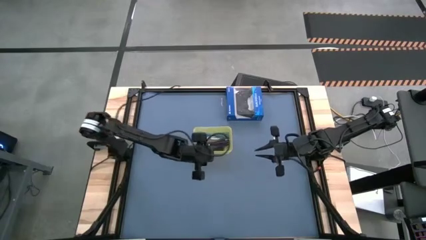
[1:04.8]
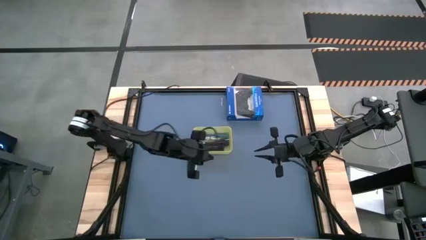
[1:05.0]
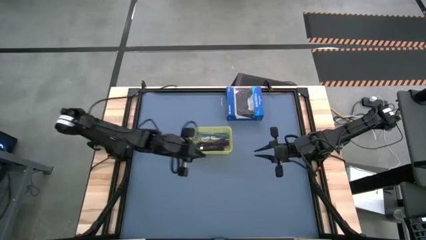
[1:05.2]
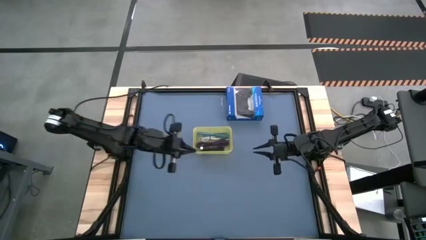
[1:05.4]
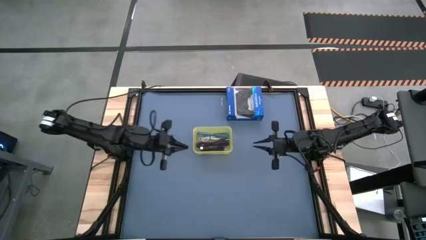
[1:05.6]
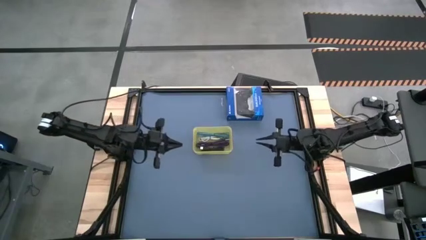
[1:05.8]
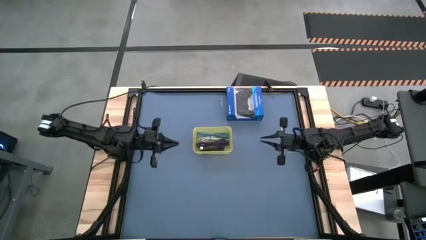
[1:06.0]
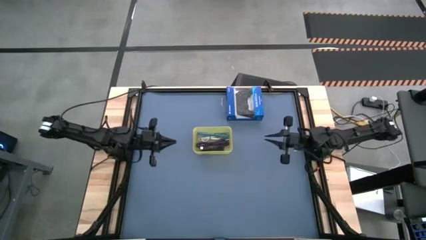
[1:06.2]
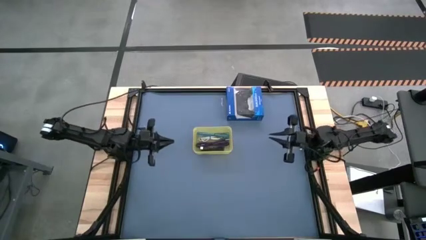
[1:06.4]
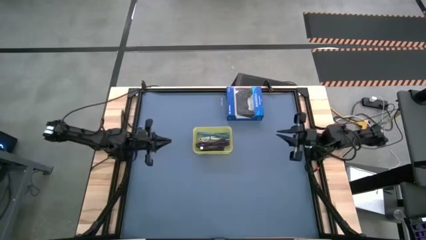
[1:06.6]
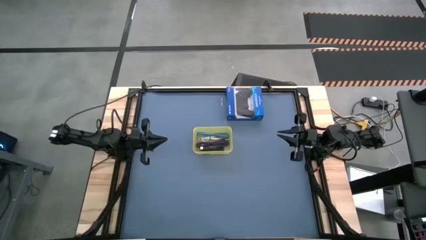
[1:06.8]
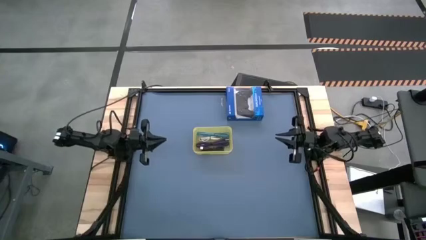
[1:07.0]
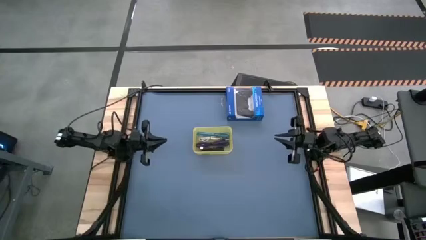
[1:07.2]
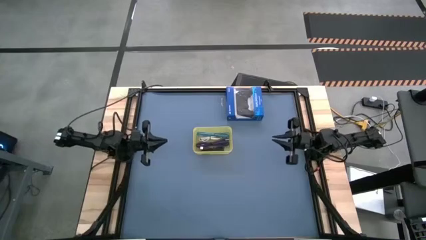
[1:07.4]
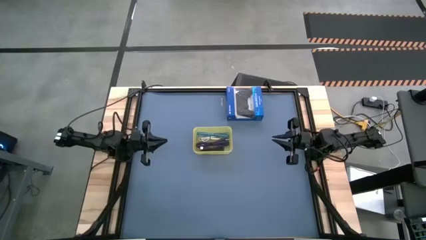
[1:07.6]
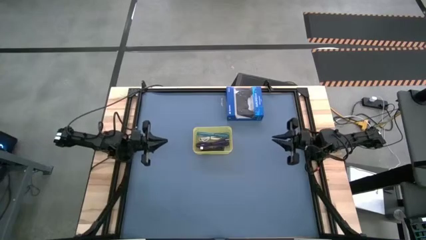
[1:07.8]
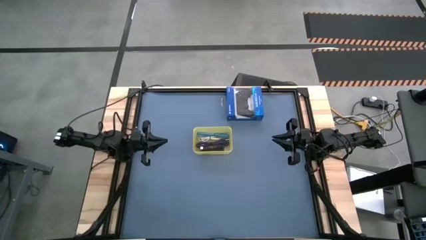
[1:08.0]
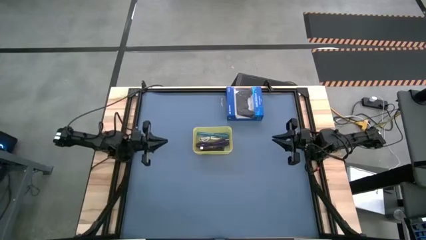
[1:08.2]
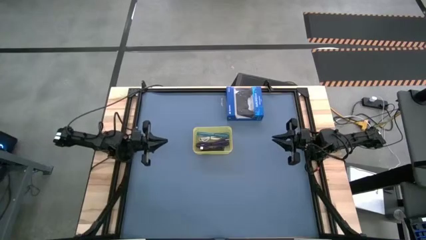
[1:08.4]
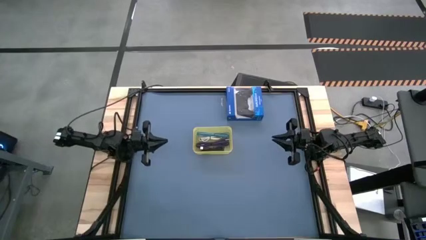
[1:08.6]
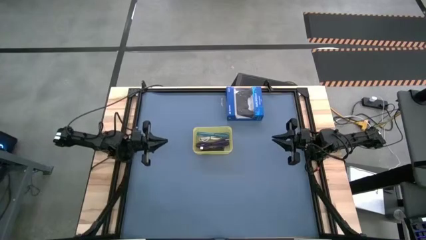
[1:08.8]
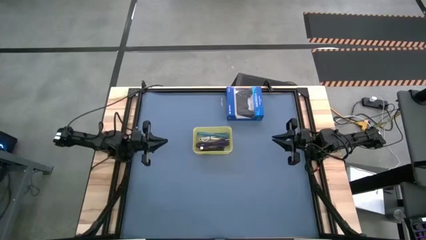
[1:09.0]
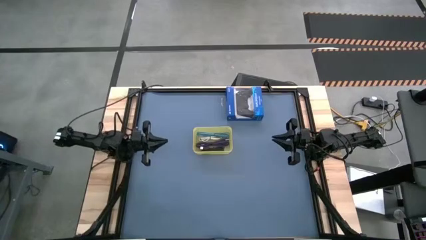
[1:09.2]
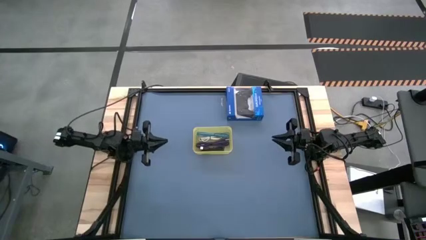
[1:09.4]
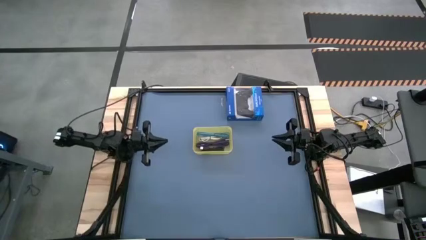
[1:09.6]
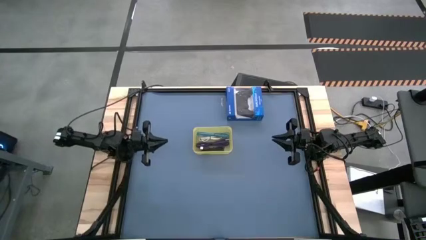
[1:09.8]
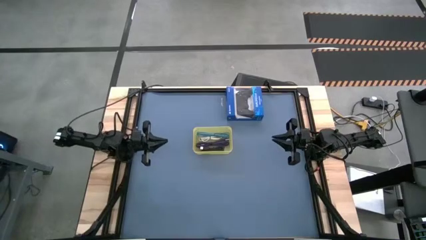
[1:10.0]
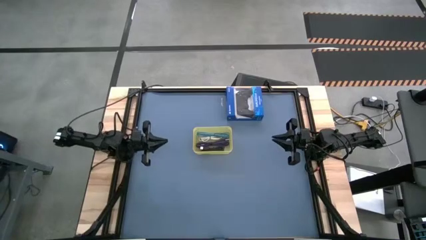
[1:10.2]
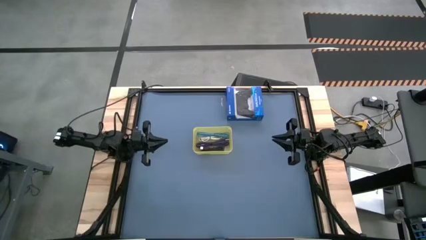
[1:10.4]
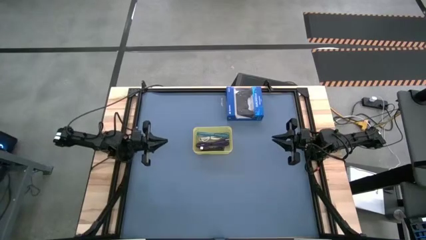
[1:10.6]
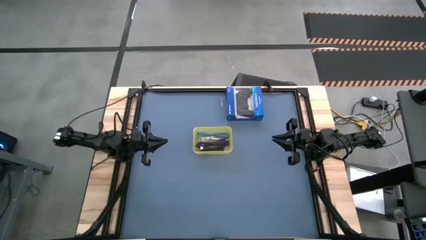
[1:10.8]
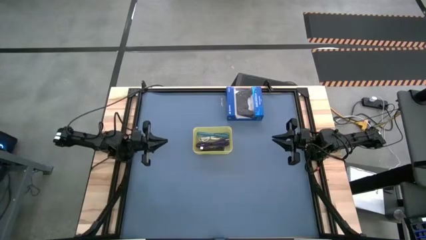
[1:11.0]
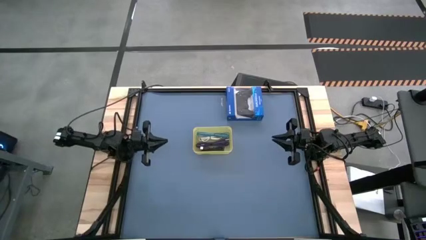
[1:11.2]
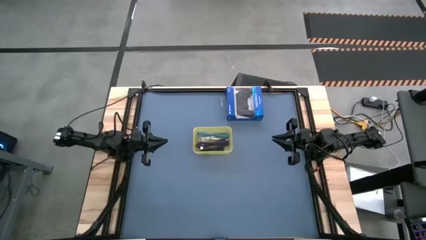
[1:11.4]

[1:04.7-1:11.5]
Task: Pick and place USB-C Cables
Return to Home Position

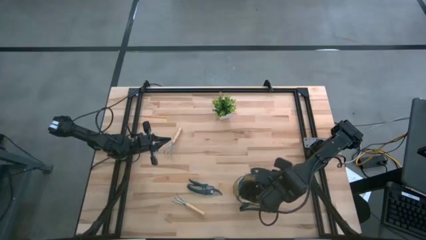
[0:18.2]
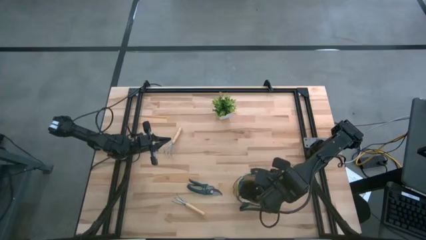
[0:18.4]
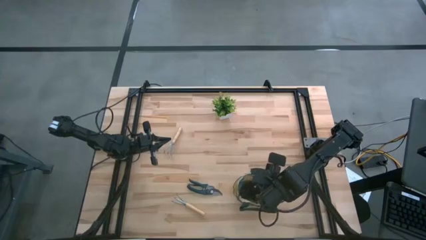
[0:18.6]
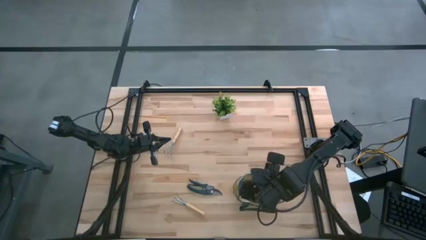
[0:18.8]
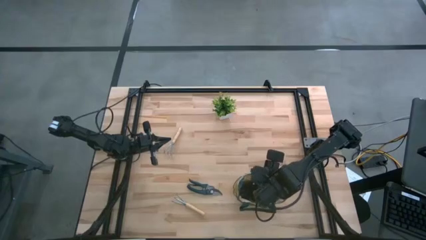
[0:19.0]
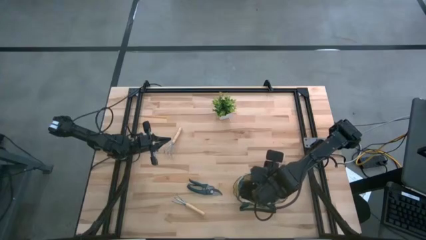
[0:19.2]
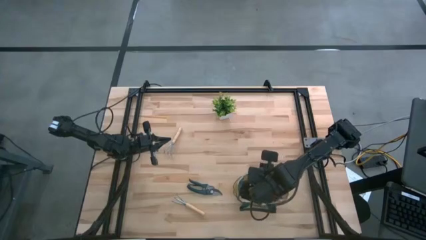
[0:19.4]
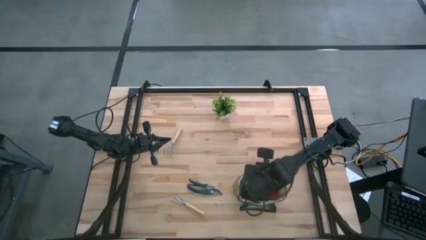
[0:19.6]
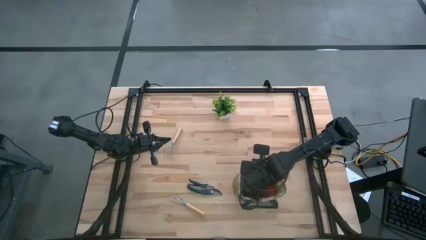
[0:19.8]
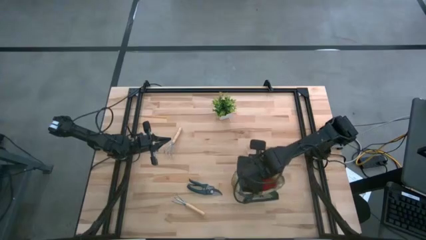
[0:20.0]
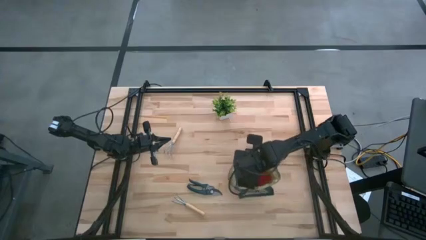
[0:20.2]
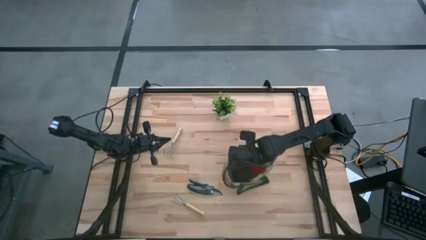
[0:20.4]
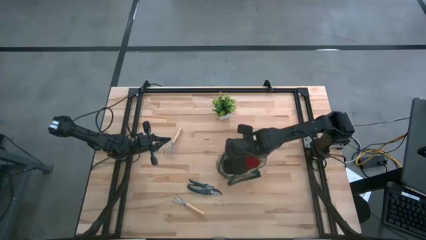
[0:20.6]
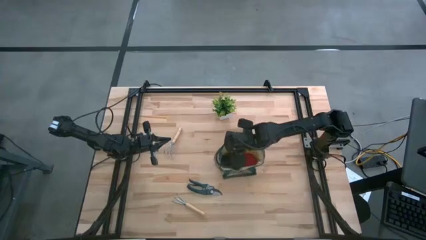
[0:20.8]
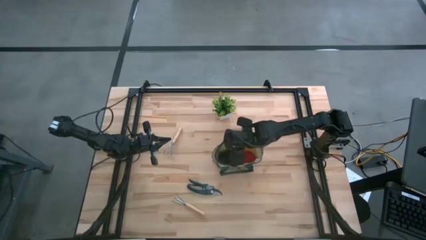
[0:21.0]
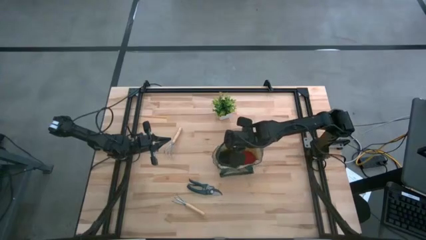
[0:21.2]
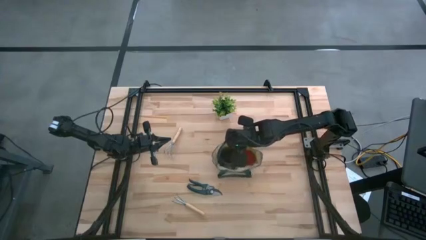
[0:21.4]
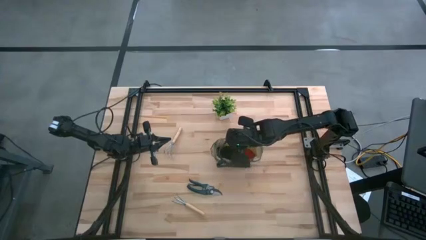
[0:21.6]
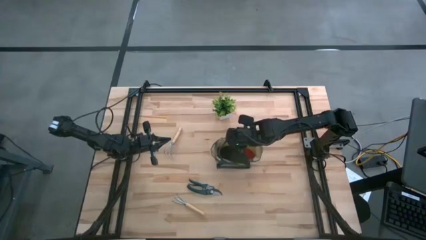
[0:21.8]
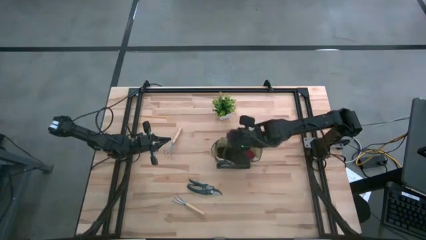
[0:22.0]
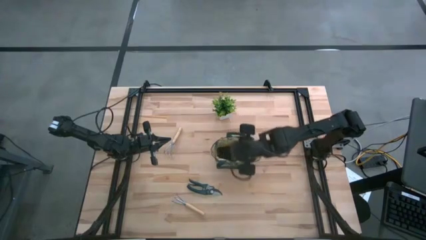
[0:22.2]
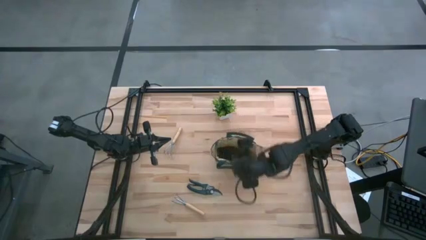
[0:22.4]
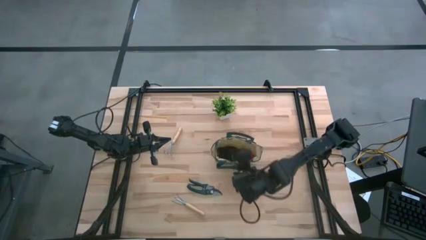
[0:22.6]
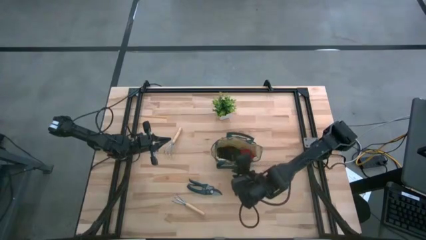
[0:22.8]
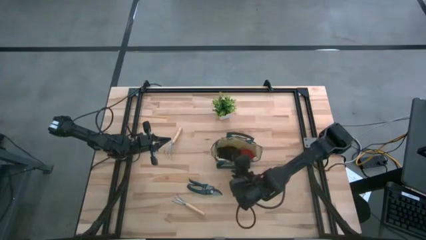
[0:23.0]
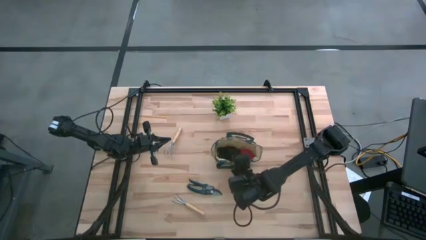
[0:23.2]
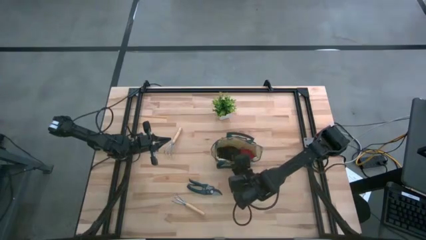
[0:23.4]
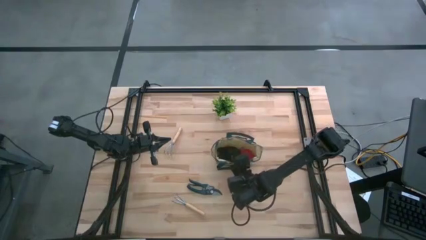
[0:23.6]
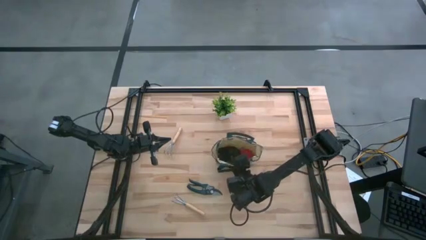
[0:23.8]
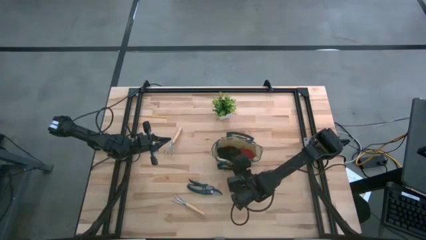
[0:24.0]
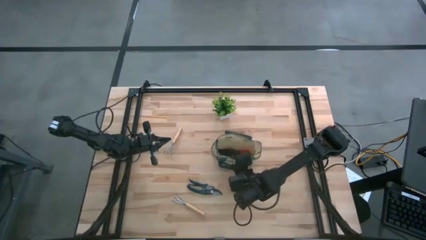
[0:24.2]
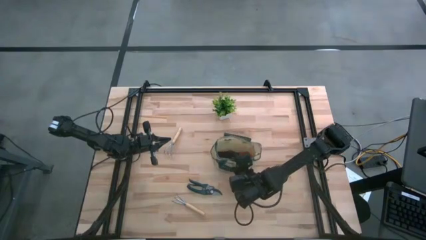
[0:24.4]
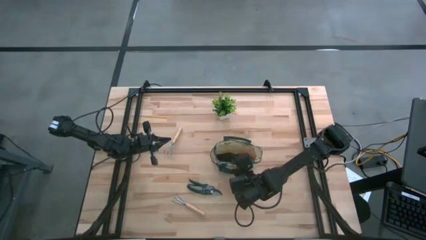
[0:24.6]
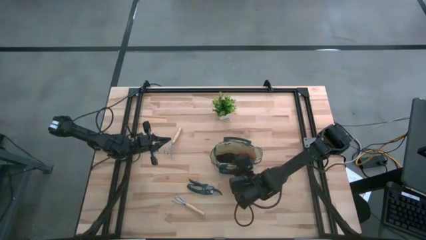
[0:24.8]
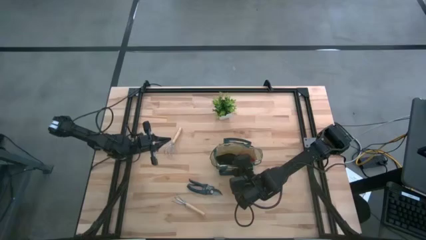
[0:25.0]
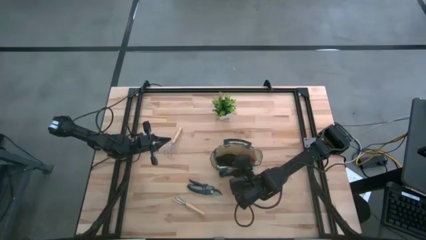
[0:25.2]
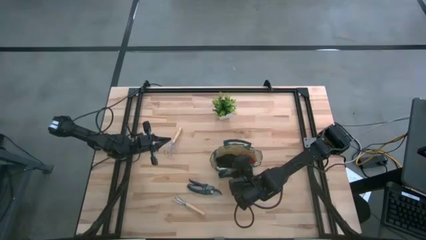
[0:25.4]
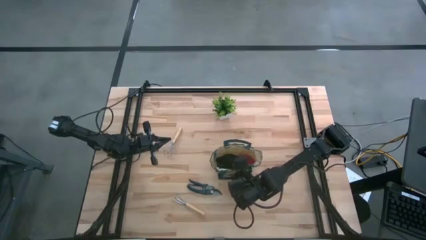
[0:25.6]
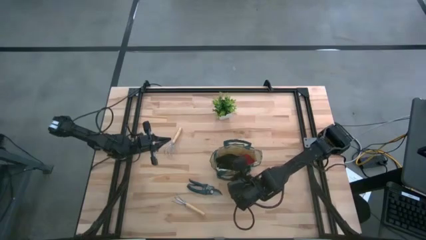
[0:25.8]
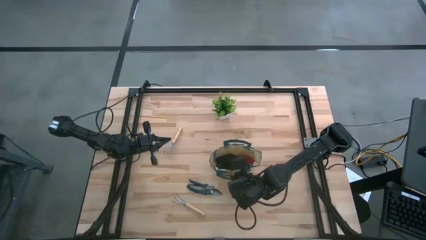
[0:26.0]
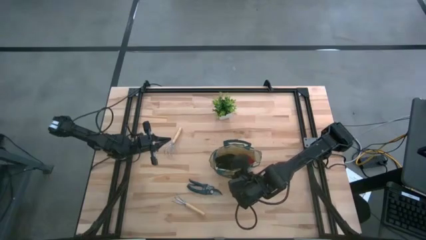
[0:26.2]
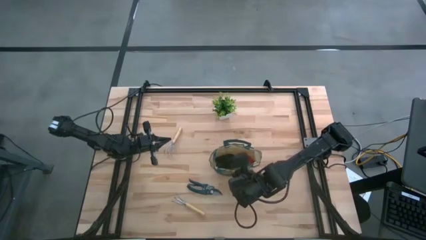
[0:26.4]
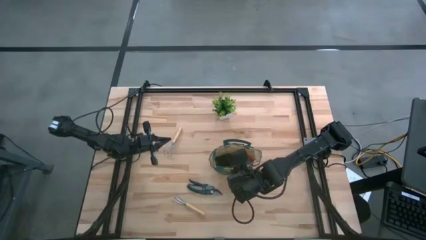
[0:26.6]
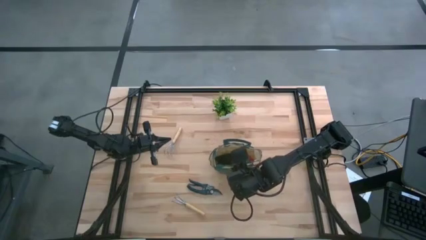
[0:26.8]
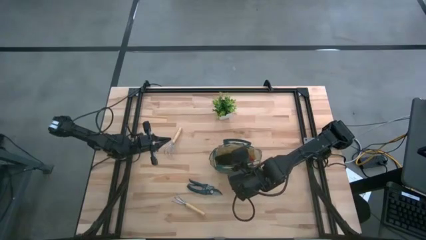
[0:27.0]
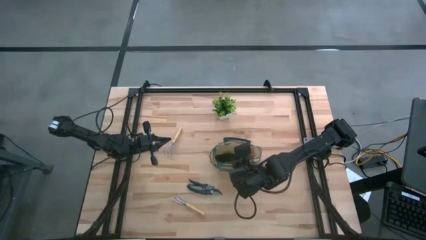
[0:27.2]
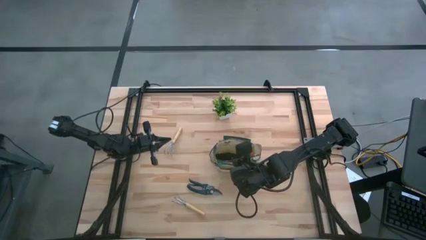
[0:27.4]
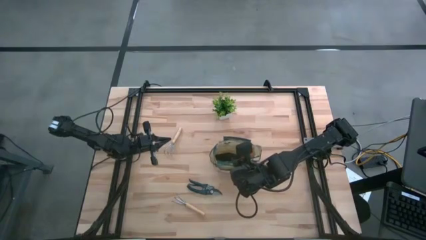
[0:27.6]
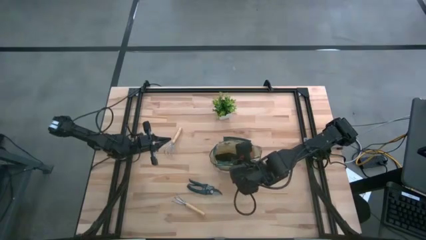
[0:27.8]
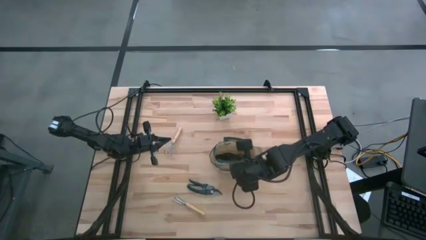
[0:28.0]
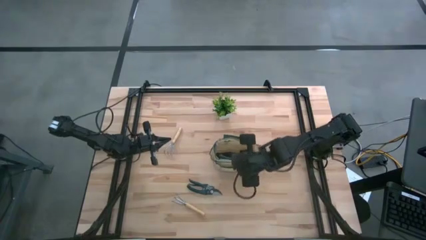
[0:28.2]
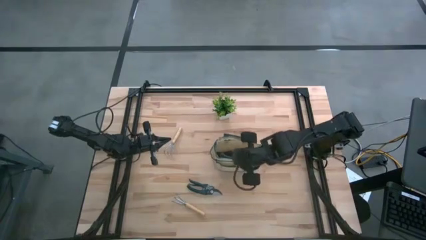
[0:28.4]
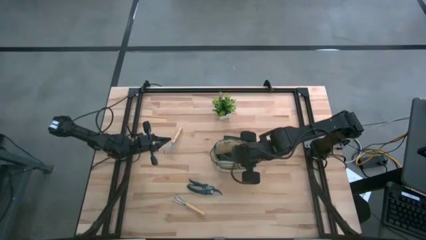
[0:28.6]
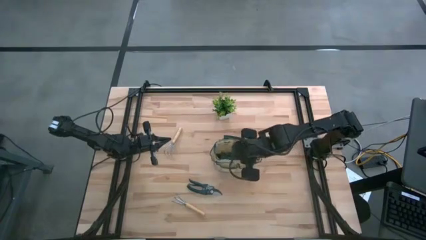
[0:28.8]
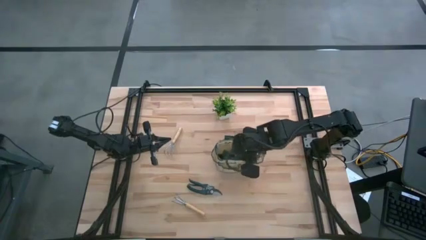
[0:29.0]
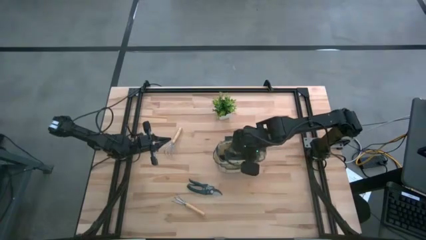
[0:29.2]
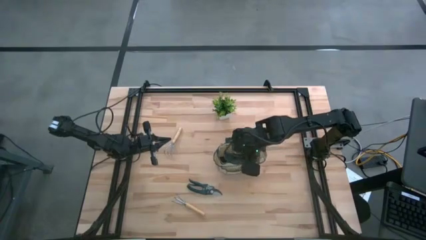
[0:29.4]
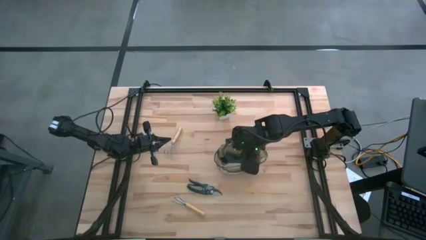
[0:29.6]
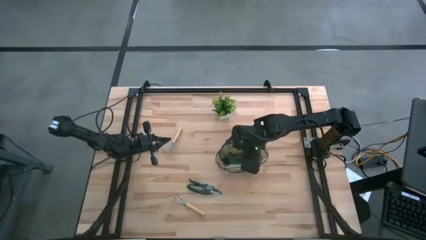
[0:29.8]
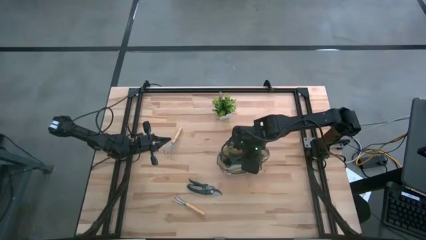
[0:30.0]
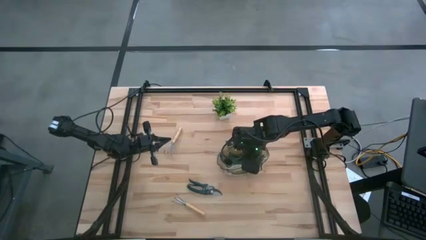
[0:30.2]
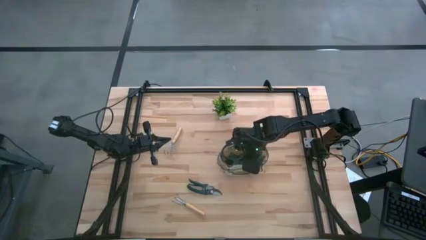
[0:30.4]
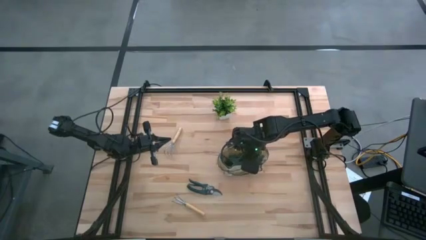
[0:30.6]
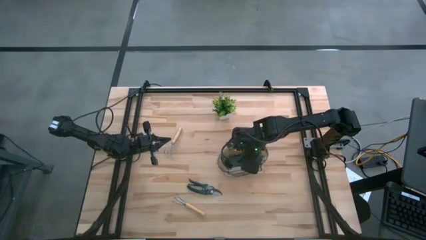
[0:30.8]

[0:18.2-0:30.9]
Task: Pick & Place Garden tools in Gardening bag
Move the gardening bag to the middle of the table
